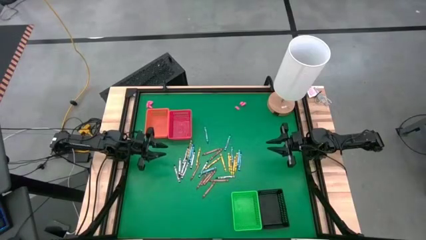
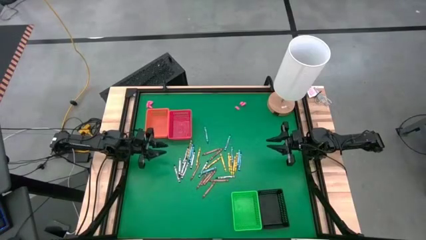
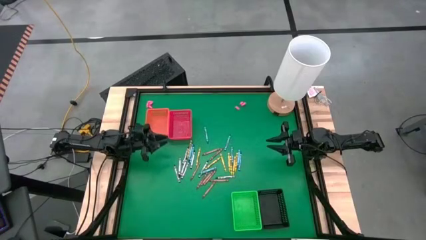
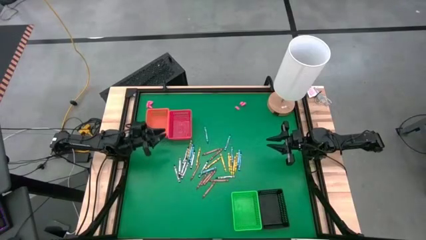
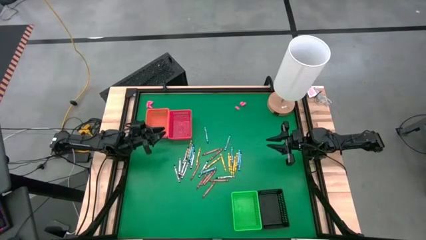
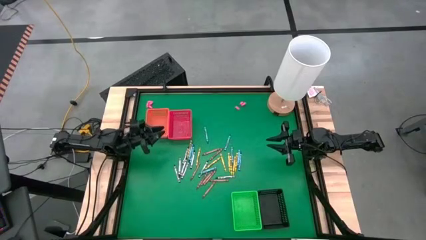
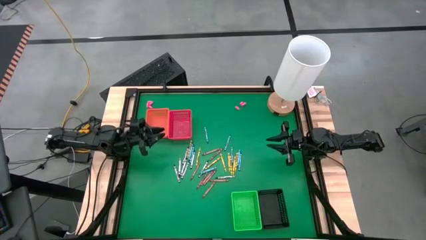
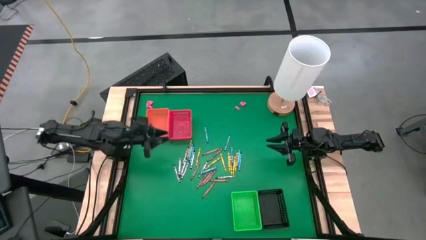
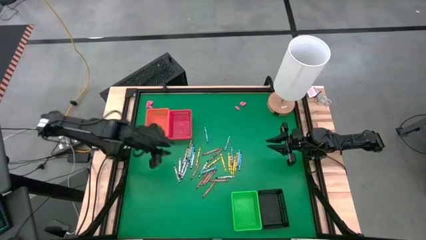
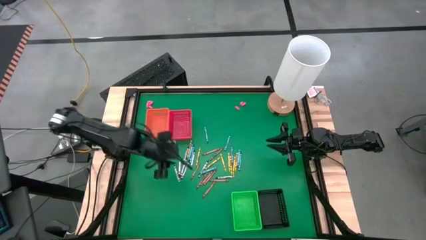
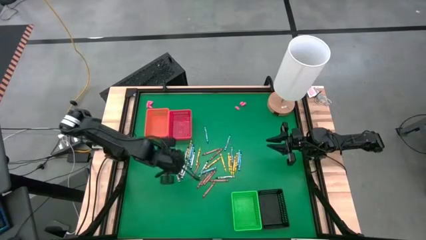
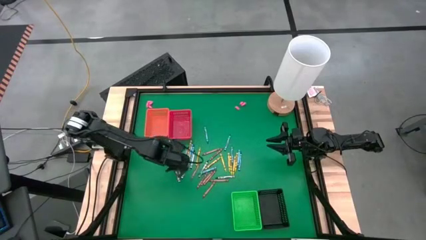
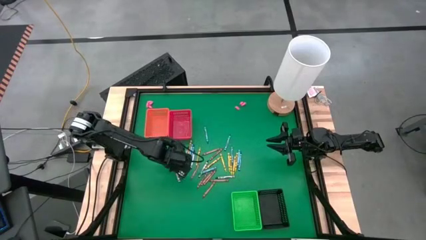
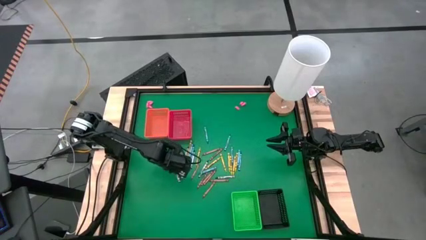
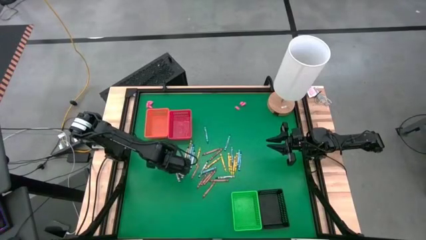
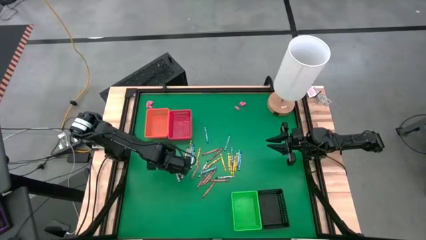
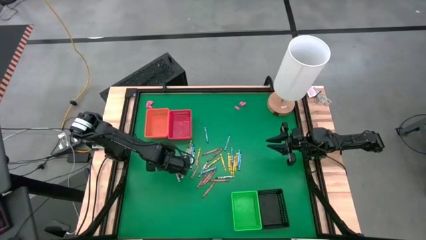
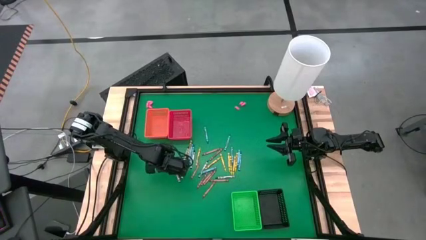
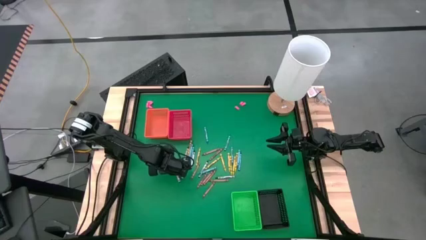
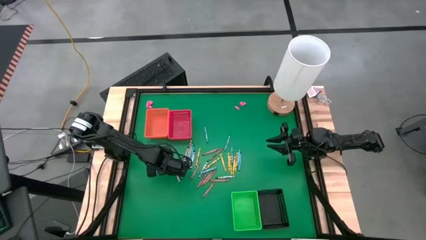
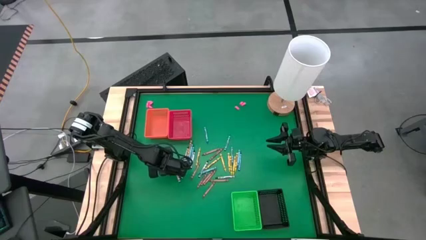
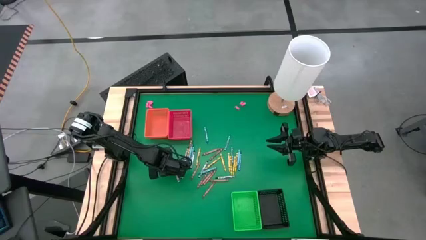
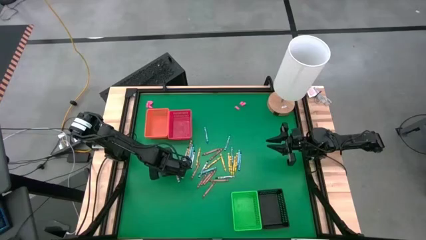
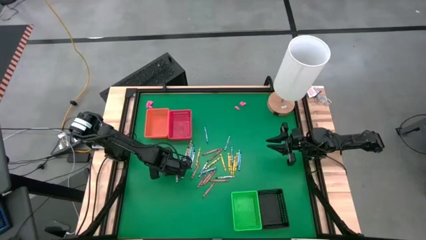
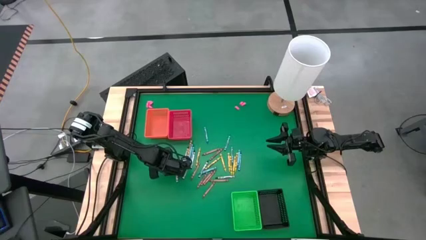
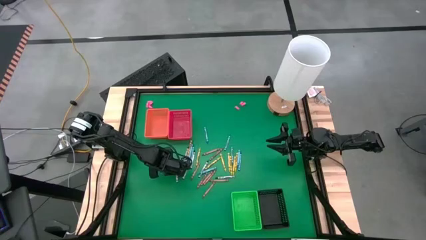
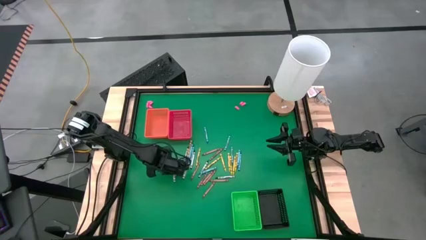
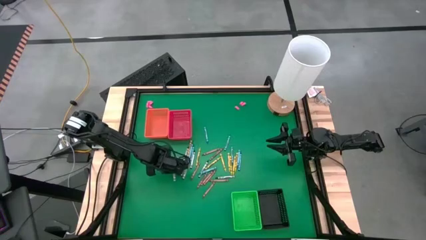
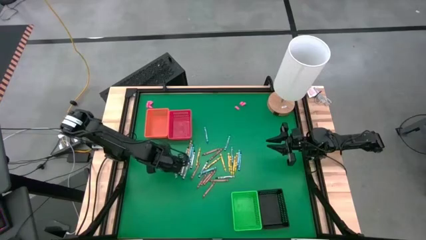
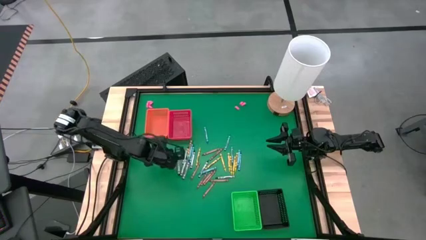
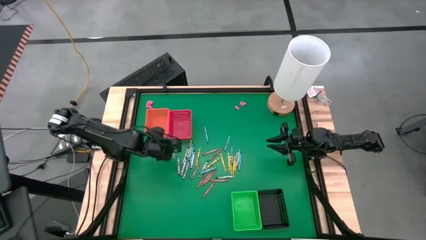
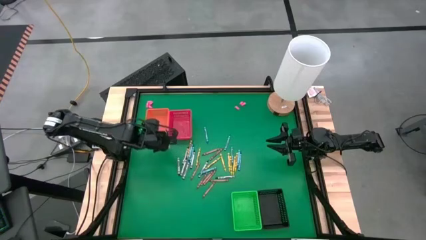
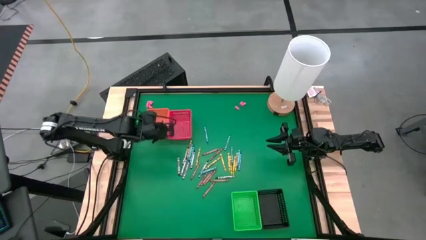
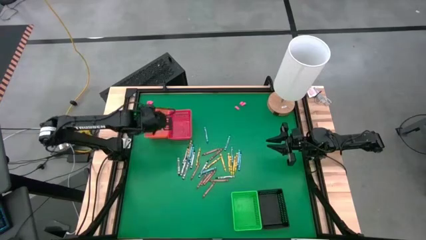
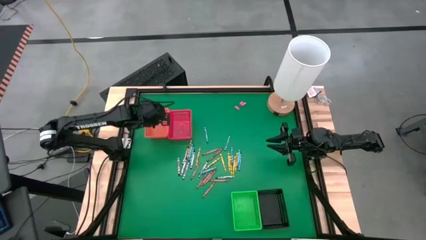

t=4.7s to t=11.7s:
Task: Sort crayons
Put the black crayon into the orange bin

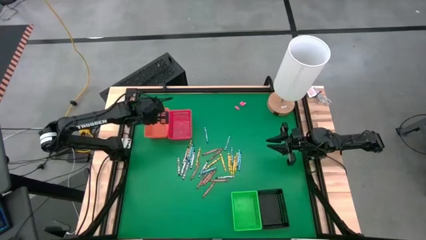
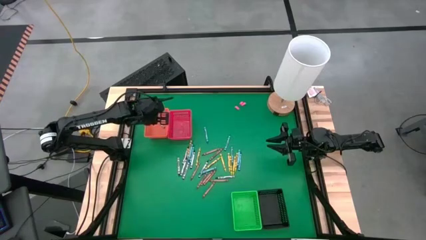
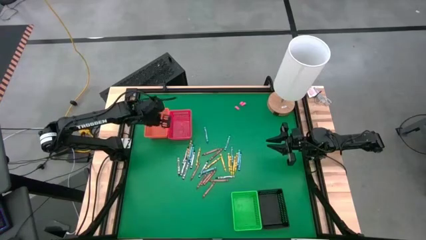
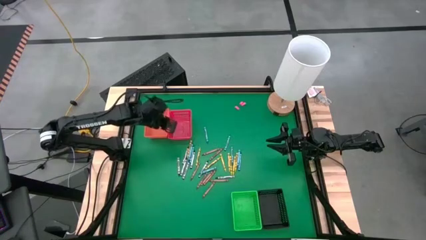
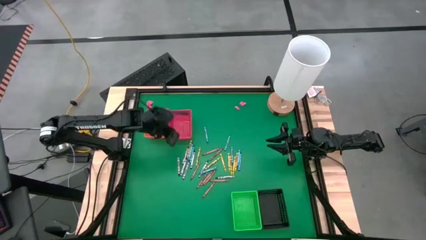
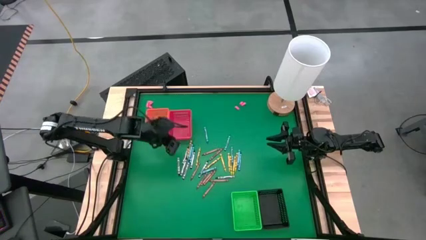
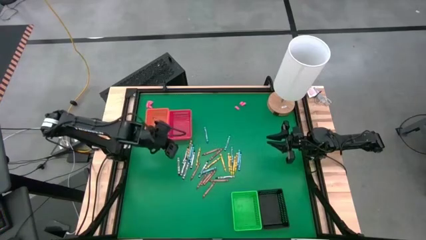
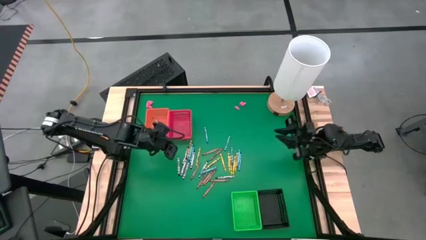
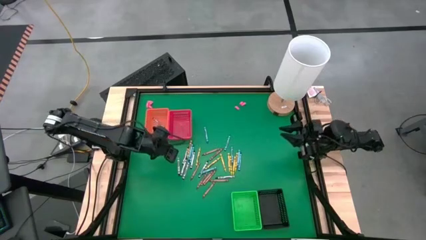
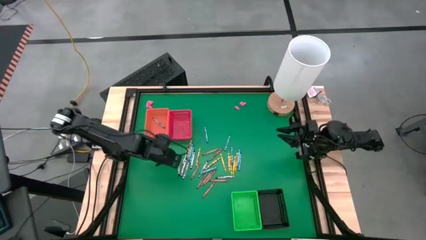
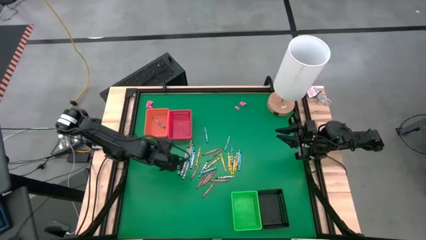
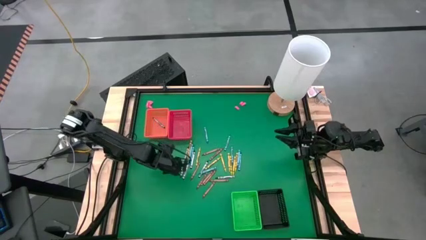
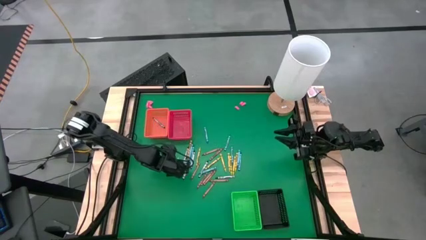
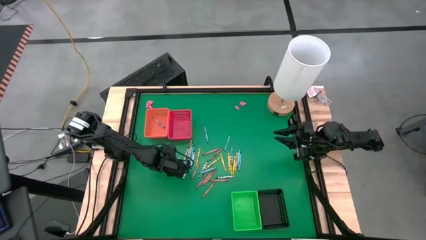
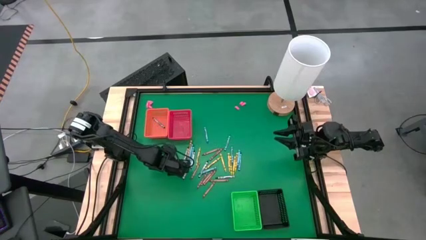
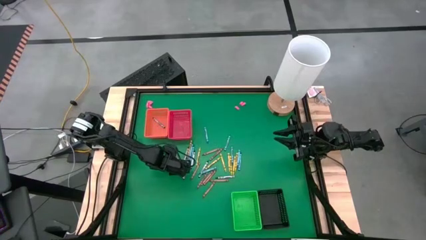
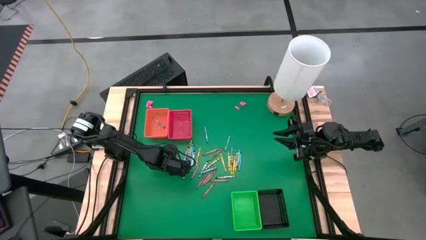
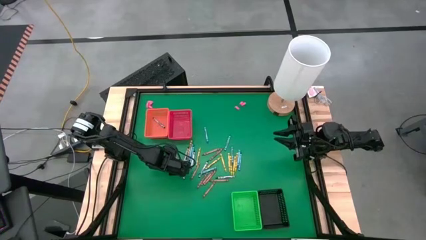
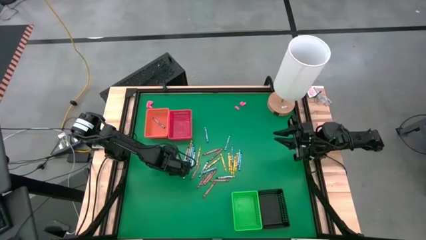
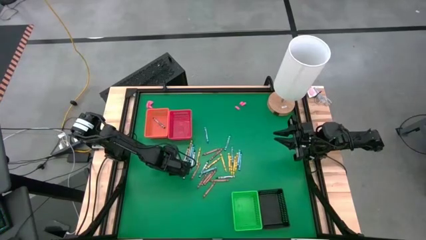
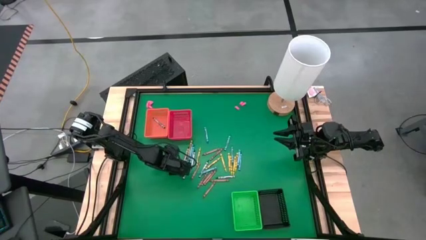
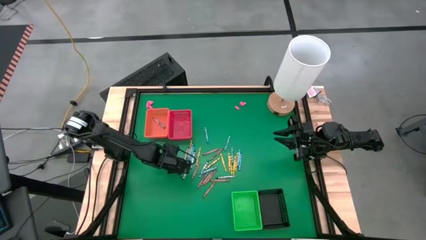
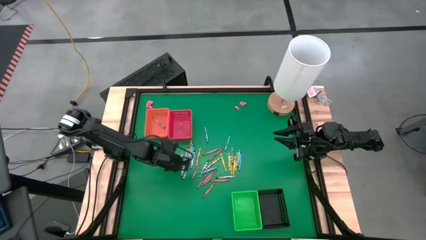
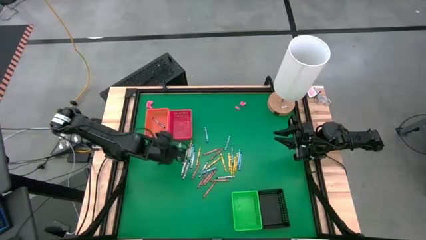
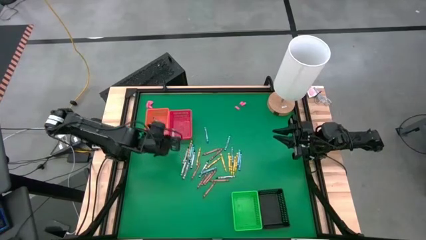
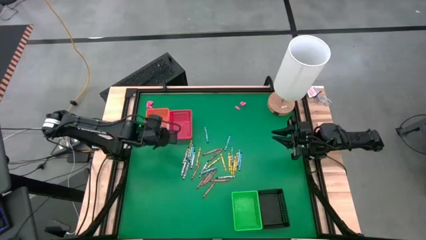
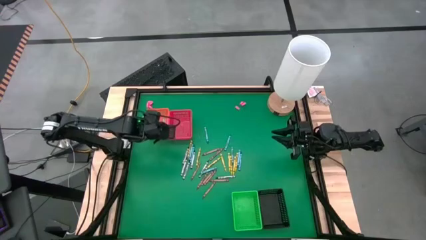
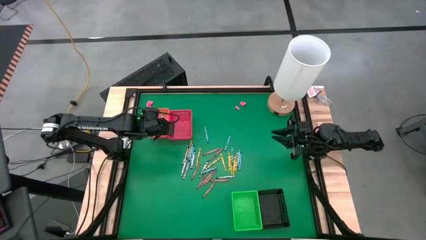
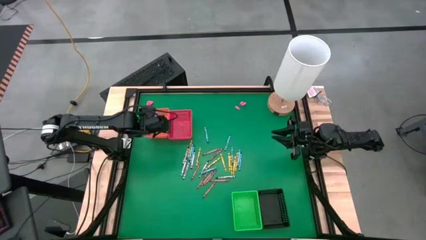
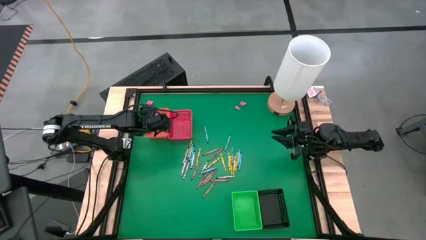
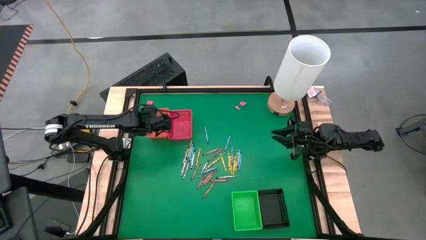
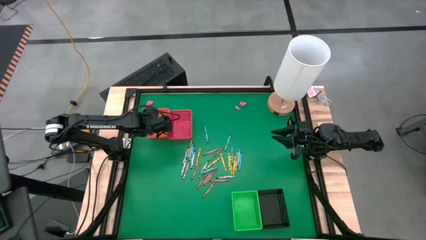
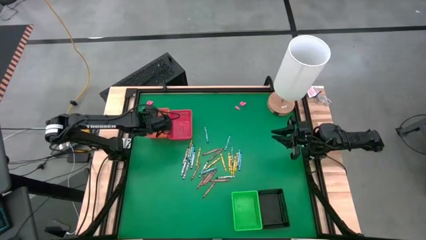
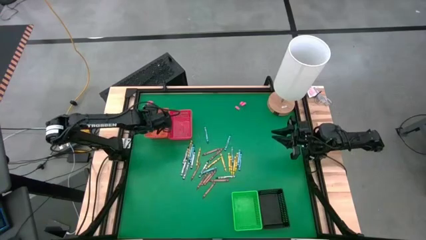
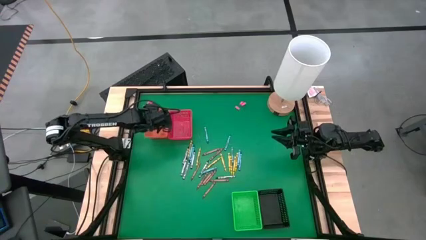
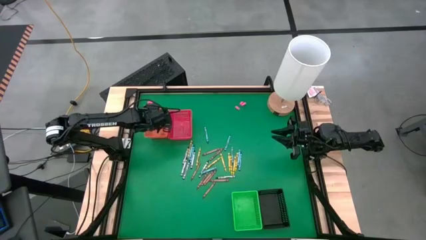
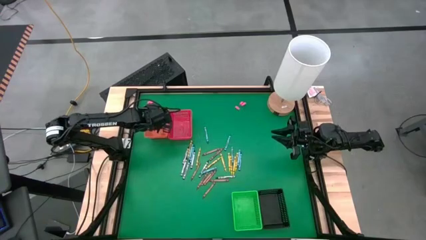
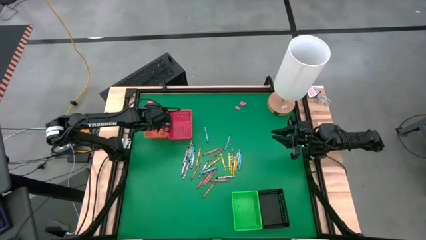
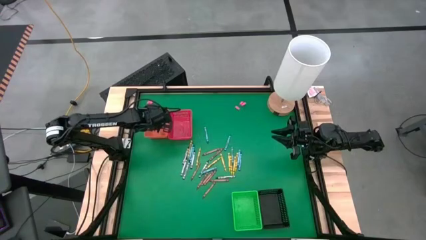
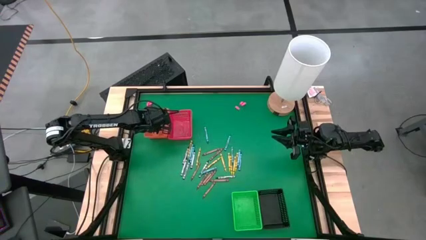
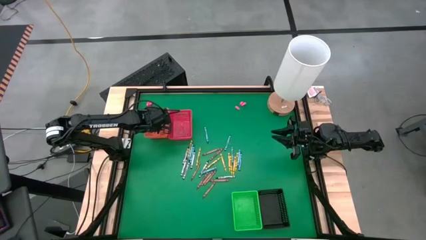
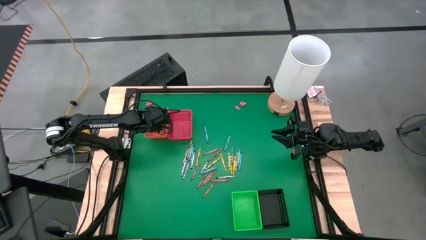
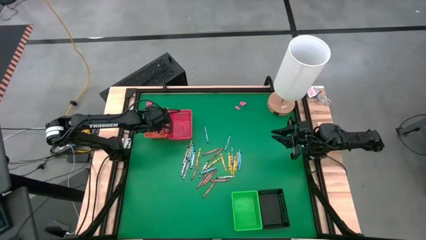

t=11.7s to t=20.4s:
Put the black crayon into the orange bin
